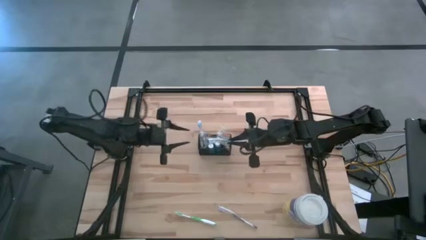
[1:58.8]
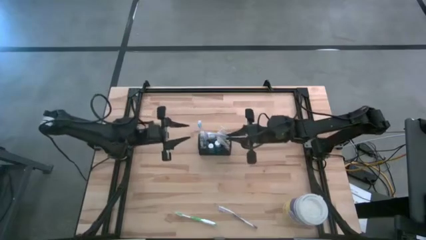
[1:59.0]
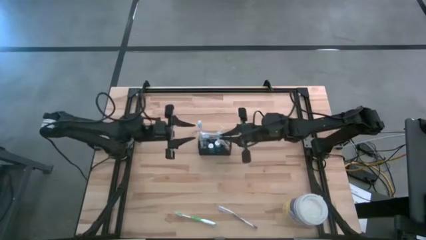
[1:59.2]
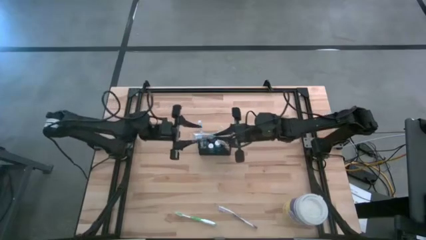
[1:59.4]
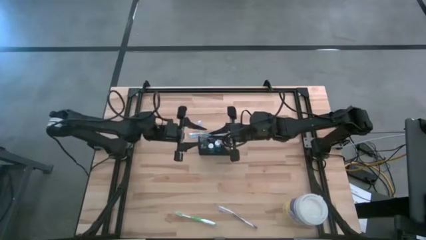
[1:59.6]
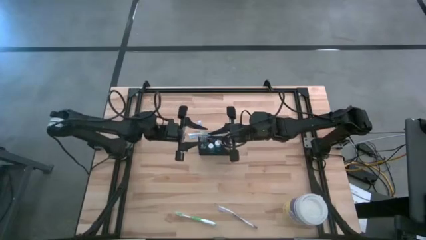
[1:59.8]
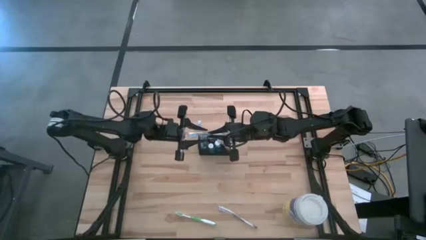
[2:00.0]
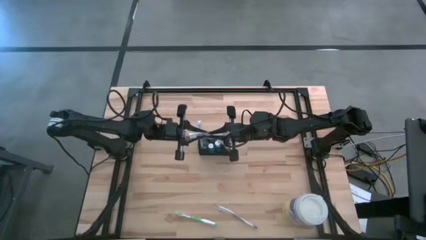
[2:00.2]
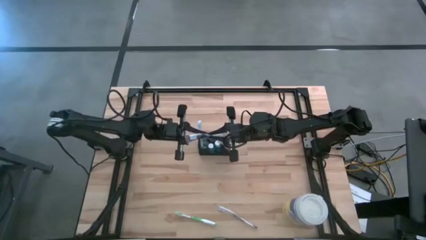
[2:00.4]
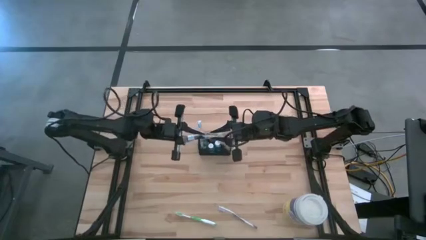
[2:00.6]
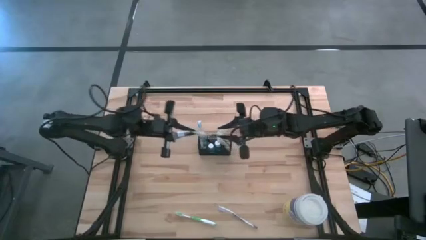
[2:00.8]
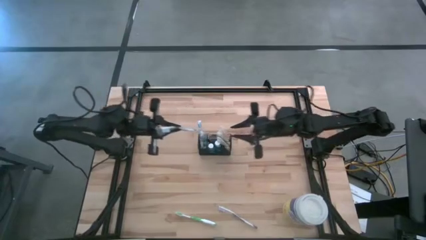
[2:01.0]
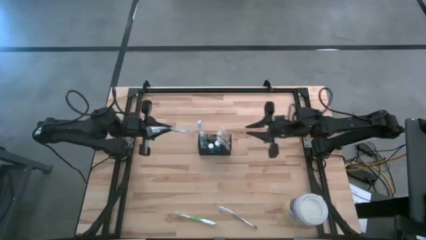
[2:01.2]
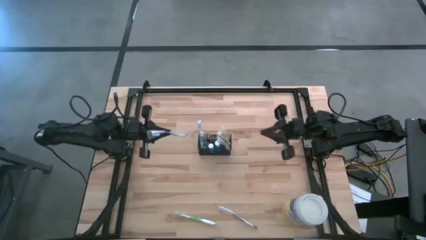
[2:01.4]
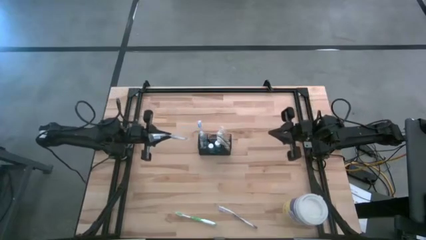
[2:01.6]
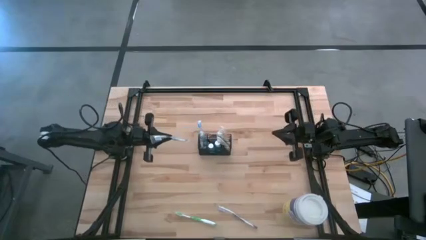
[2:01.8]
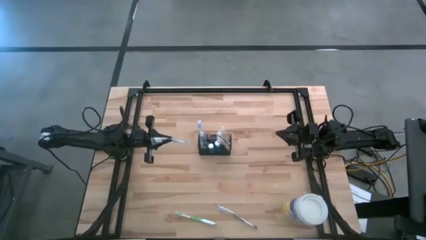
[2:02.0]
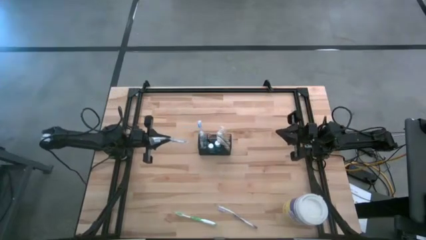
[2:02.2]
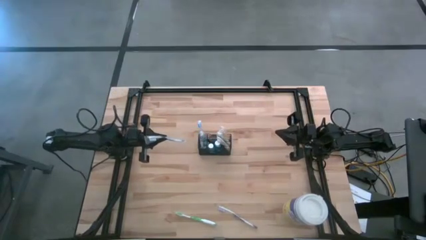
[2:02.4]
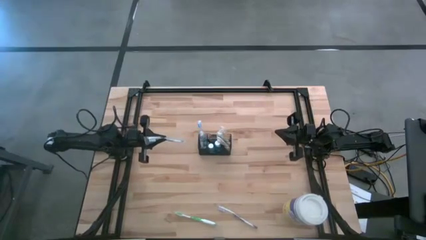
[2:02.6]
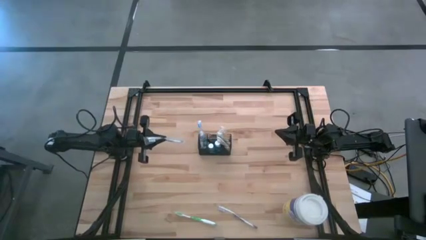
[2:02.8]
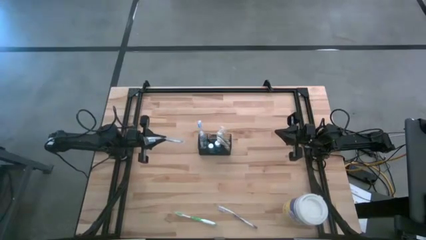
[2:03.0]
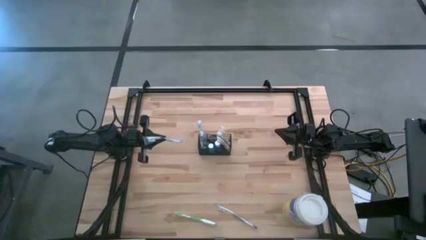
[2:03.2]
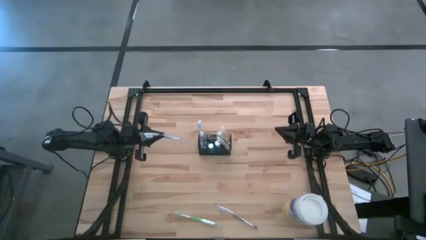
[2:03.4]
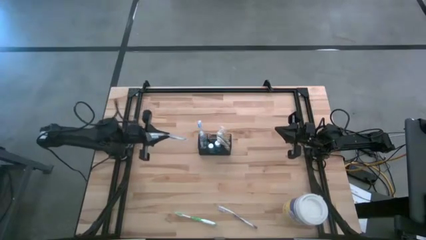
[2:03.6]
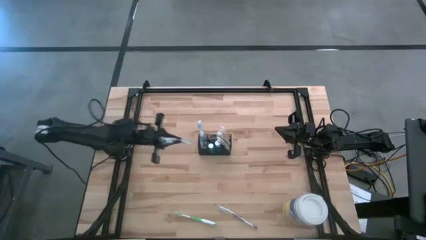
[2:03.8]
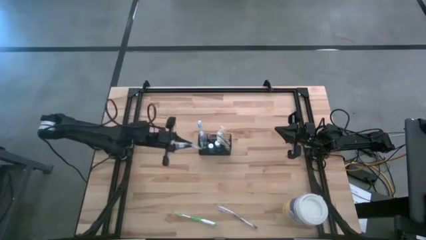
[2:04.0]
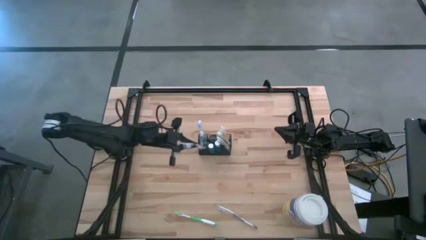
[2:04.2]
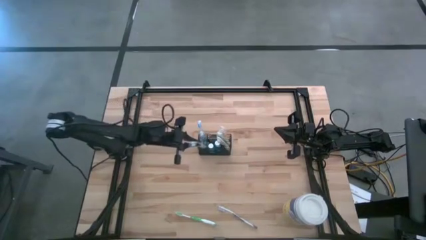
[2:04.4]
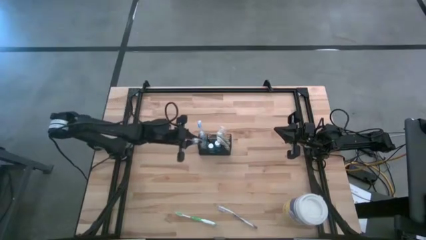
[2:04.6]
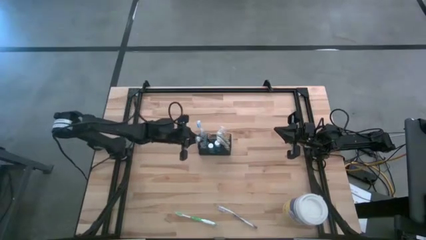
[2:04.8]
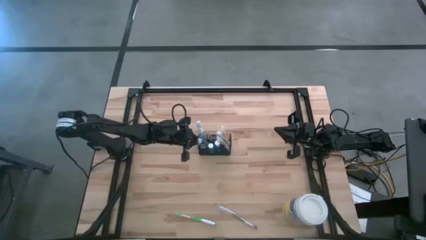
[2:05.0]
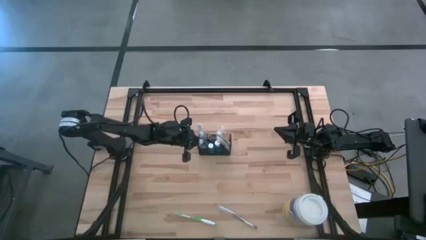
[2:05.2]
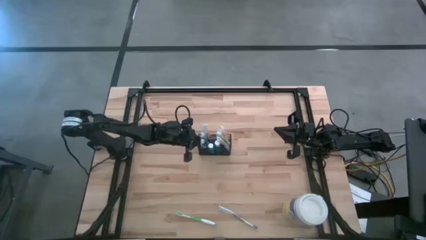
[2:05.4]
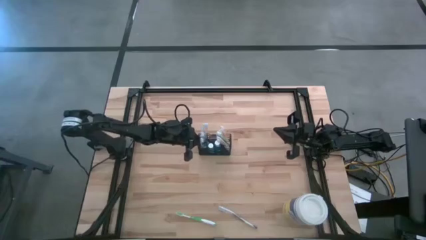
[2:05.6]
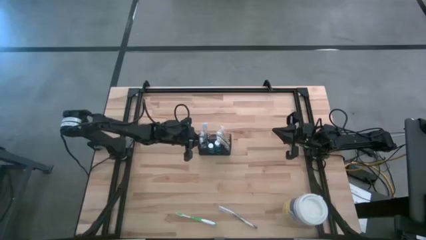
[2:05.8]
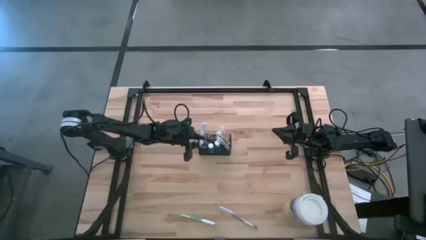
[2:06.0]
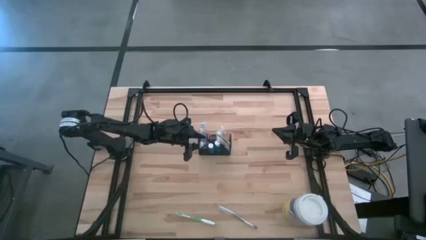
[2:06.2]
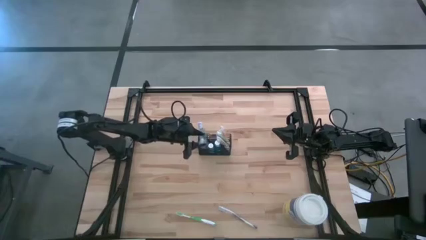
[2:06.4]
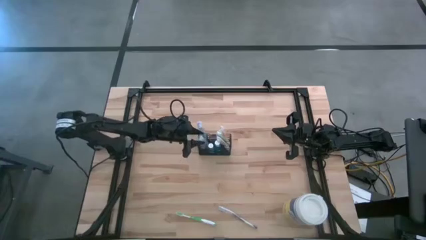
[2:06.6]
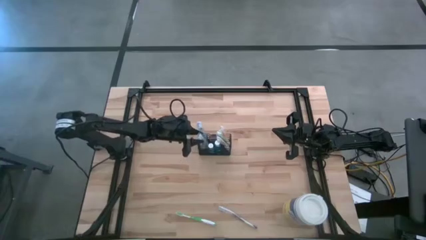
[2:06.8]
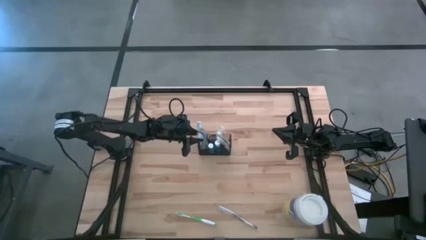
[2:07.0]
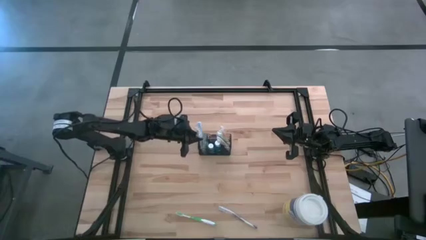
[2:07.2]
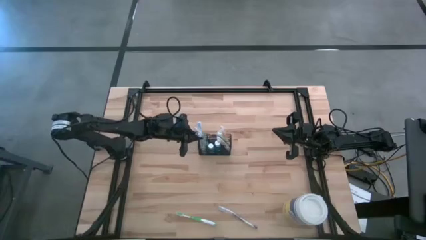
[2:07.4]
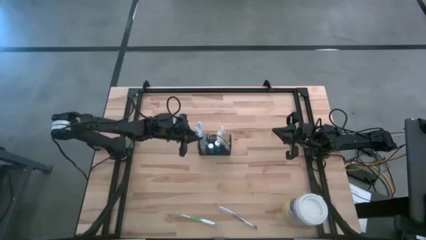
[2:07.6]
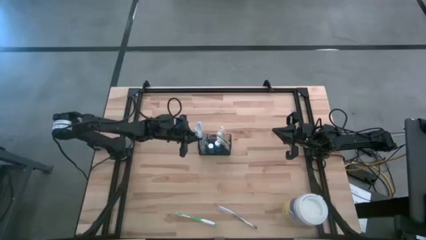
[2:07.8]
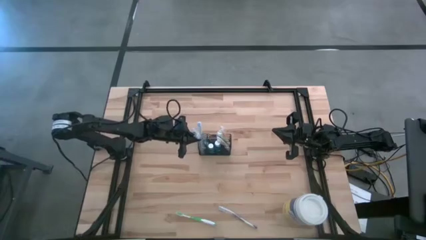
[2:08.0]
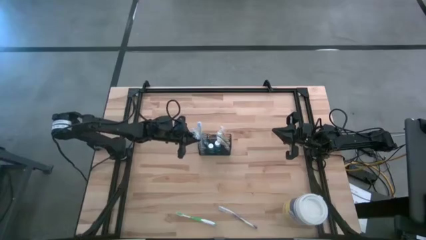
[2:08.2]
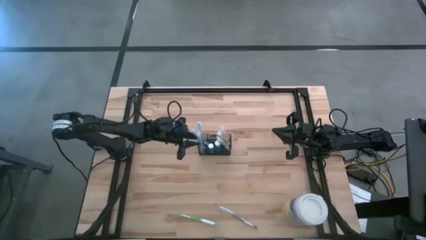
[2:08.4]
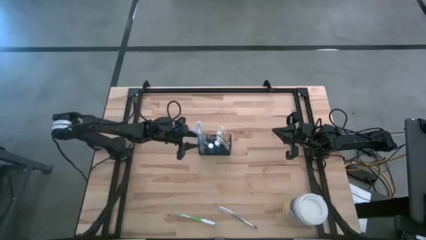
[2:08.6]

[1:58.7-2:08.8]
Task: Pick & Place toothbrushing station
Put the blue toothbrush into the black mesh organizer
